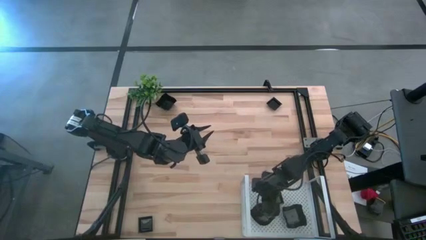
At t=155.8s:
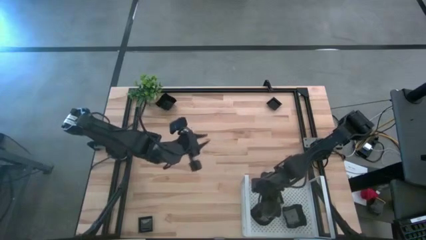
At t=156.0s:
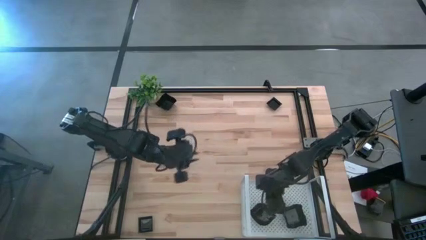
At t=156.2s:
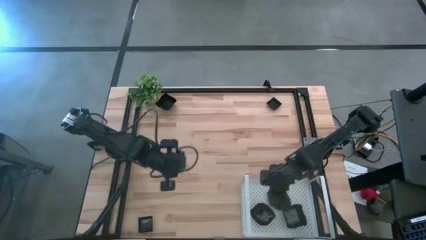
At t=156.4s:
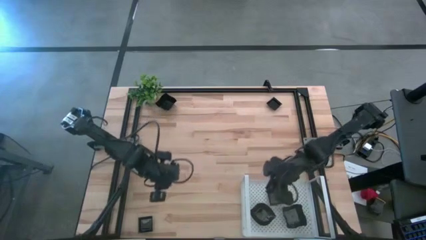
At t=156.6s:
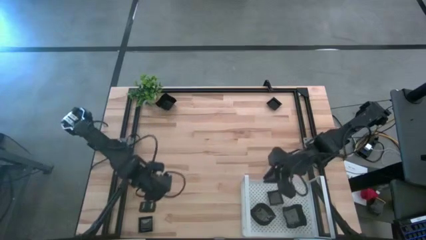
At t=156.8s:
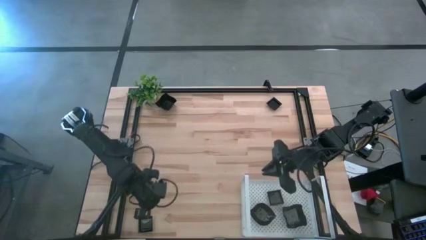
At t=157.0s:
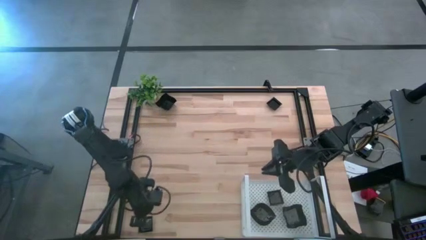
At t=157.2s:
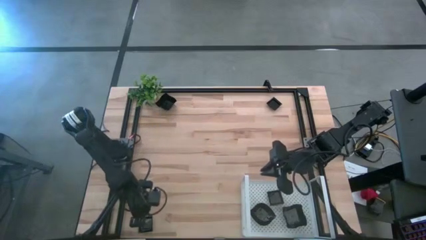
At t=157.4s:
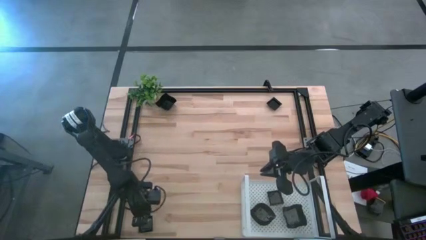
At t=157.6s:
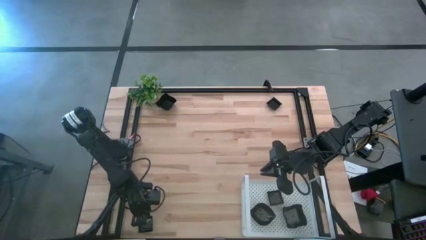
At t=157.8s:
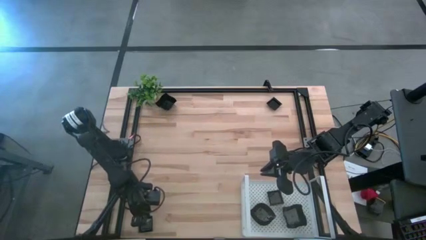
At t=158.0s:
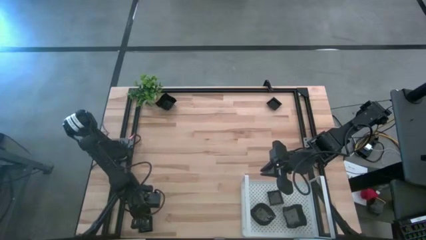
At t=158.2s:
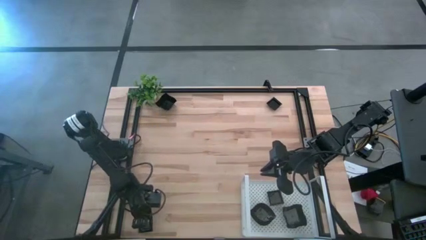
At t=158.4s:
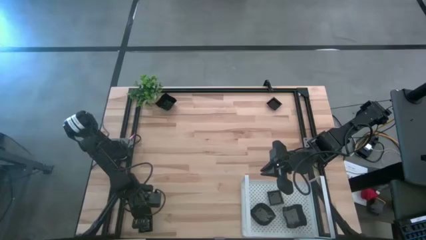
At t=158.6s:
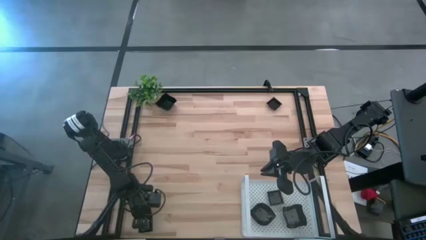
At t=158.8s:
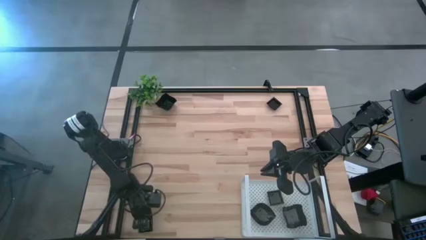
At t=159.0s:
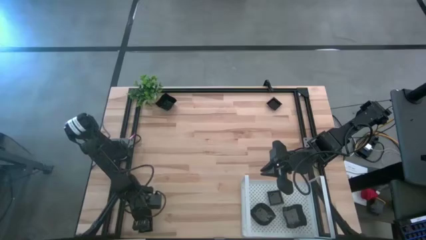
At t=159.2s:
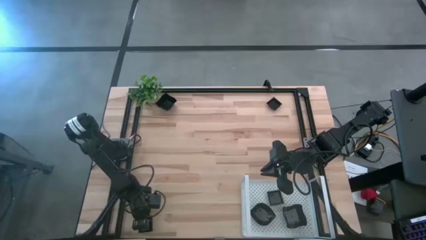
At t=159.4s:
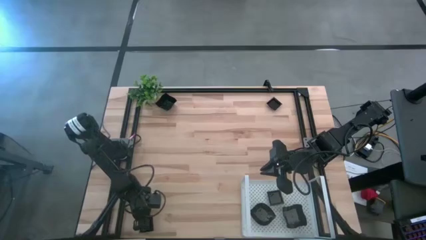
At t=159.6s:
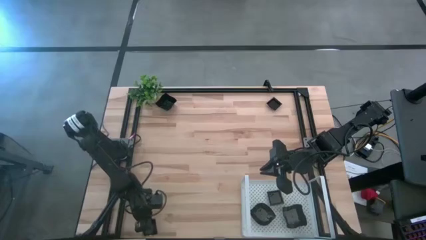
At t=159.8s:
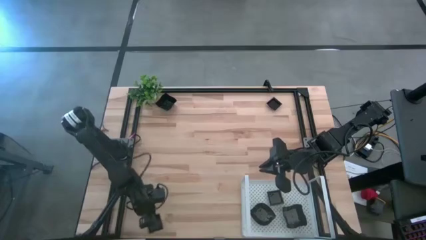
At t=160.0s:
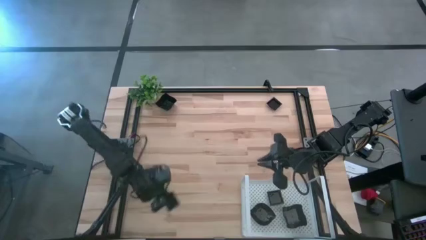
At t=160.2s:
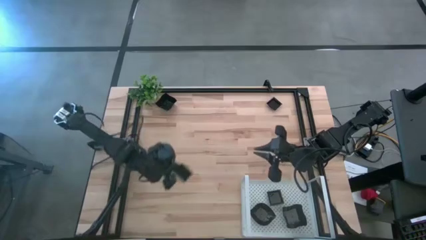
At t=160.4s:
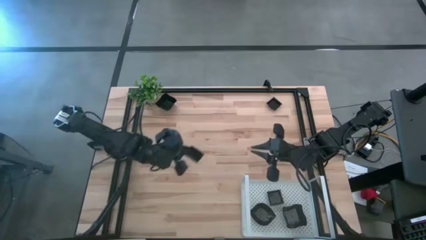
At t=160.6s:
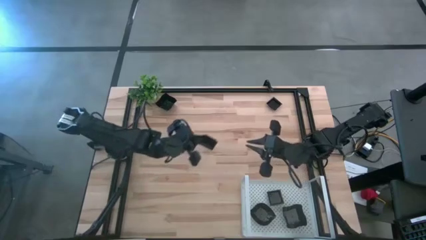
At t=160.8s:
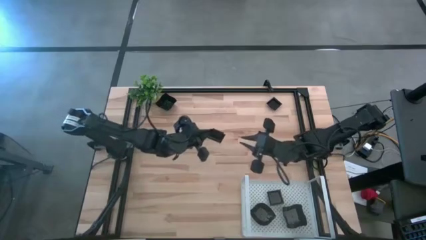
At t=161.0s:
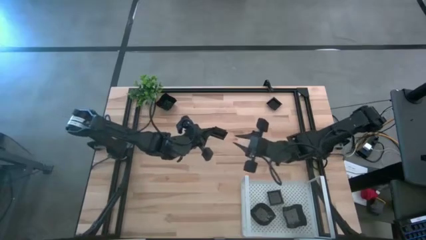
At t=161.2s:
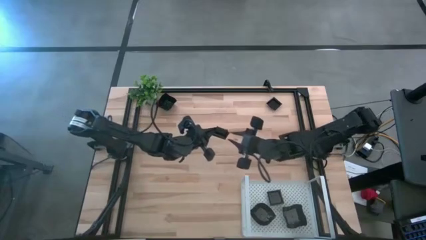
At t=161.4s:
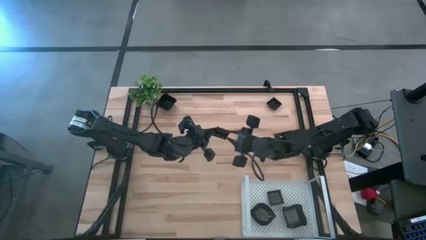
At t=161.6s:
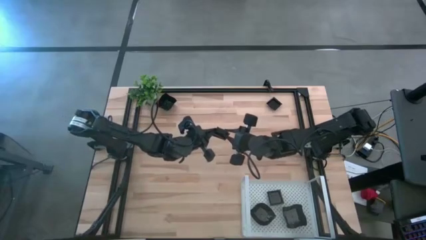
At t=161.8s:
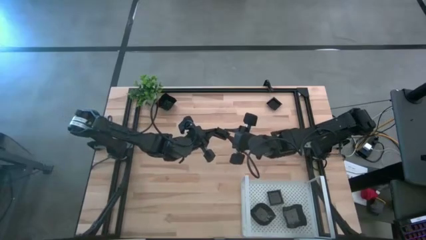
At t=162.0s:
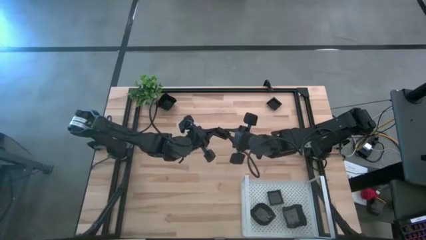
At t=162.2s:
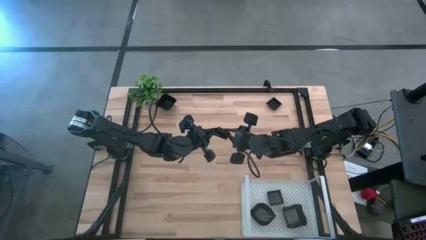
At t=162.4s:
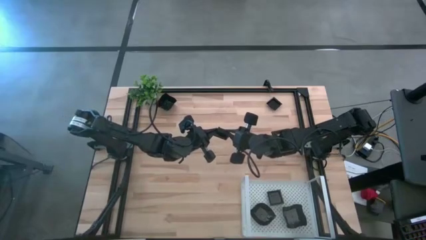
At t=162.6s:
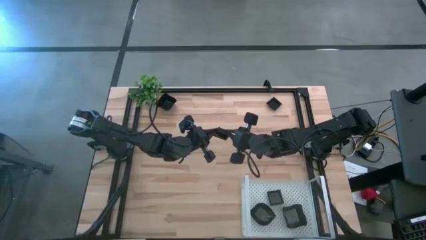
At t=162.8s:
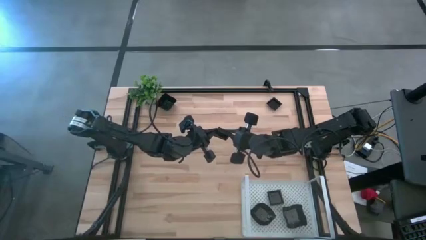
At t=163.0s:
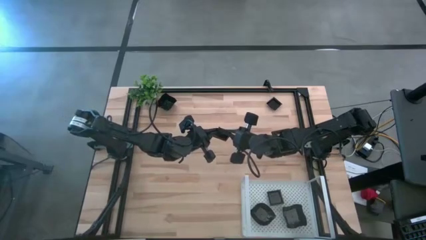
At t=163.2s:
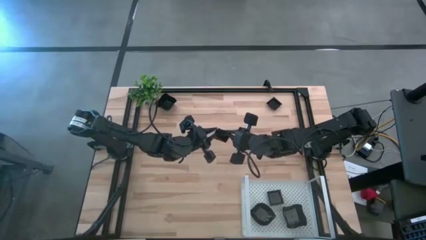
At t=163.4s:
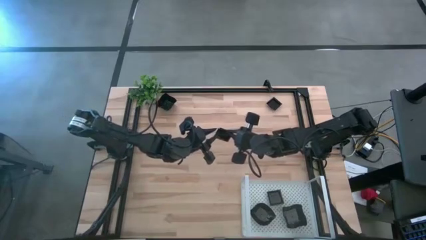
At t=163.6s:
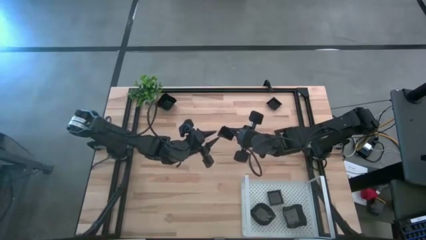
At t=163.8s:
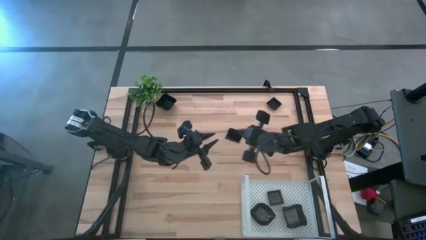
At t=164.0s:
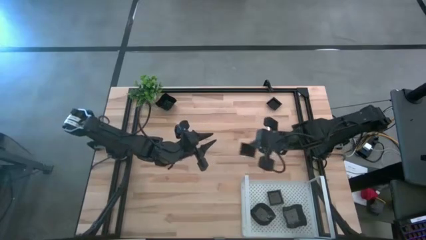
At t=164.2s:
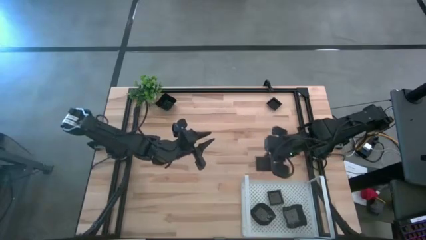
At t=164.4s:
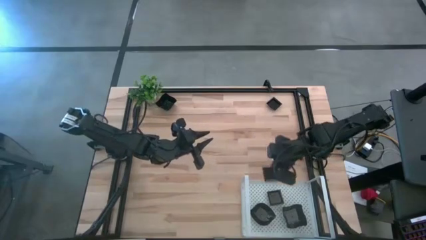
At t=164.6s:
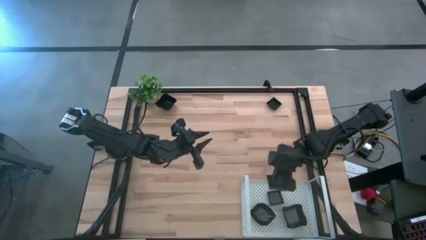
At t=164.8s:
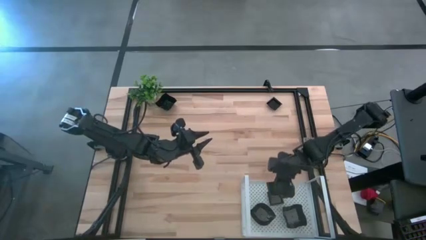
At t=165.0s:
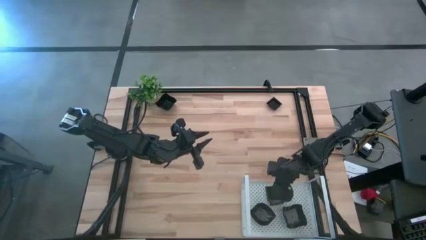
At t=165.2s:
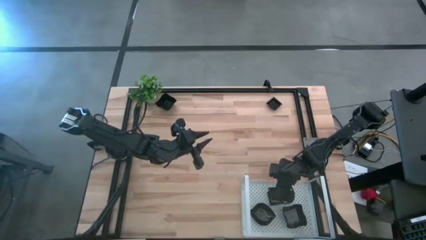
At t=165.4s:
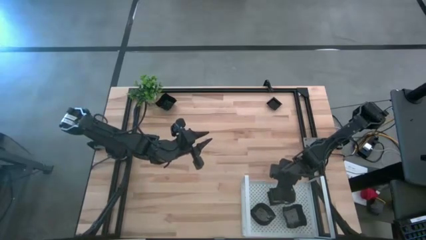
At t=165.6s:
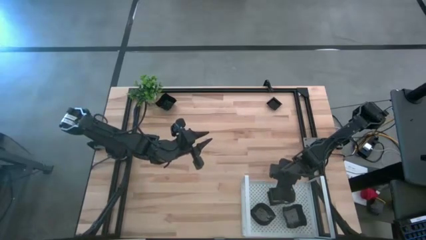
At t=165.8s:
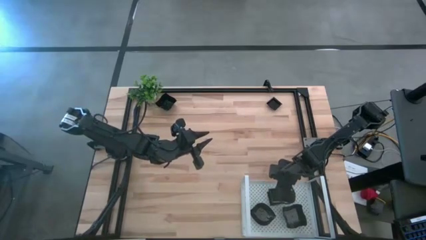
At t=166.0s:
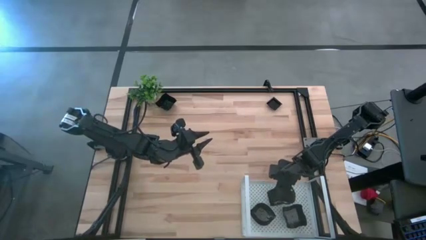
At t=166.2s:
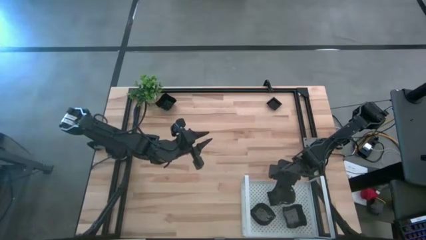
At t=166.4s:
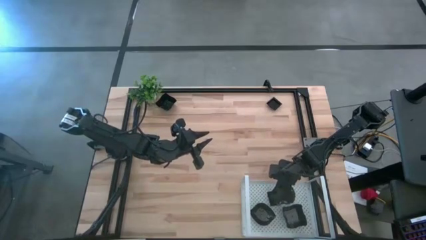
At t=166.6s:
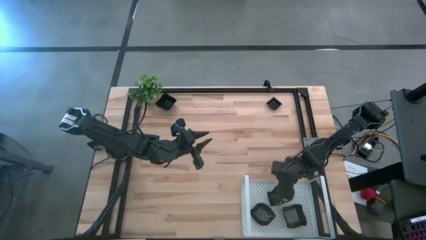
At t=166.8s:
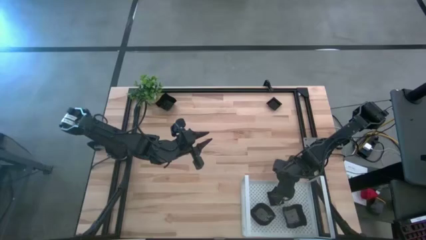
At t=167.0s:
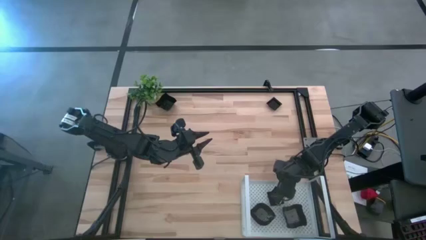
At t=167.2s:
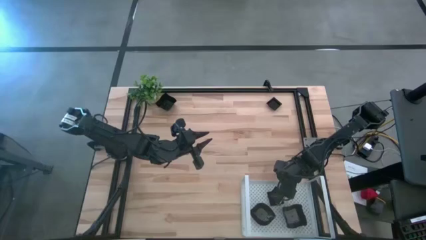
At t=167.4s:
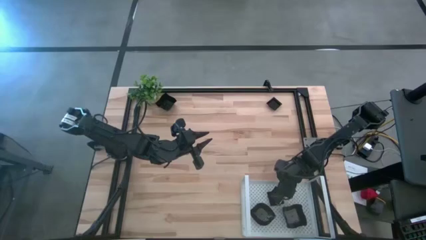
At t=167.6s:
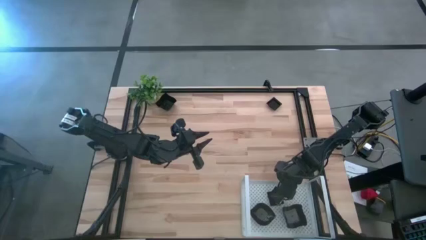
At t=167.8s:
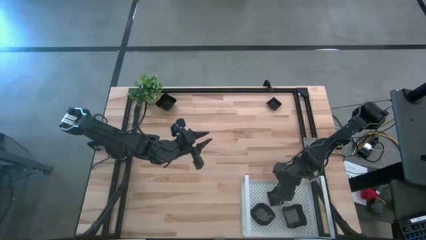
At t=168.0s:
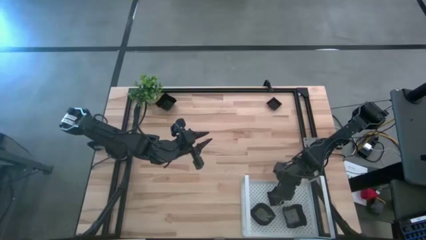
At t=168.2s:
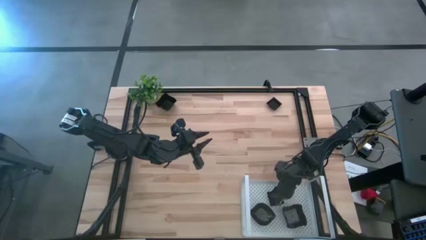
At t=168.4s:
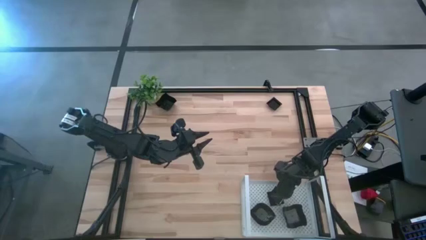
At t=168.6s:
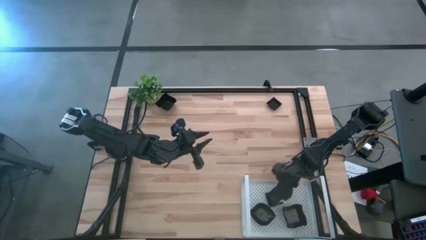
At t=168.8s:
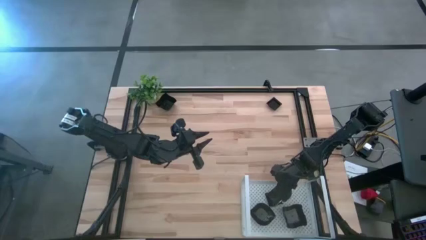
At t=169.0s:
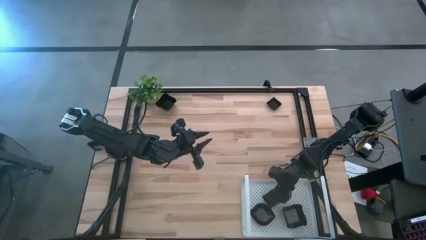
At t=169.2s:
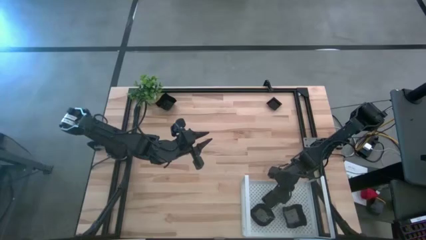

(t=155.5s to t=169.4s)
Task: Pick & Place Mini shaped plates
Stack the square plate on top of the other square plate on the shelf

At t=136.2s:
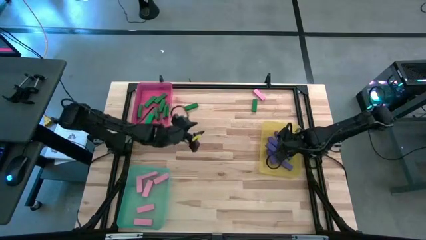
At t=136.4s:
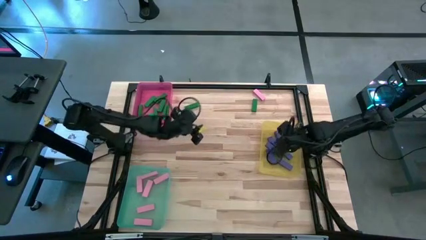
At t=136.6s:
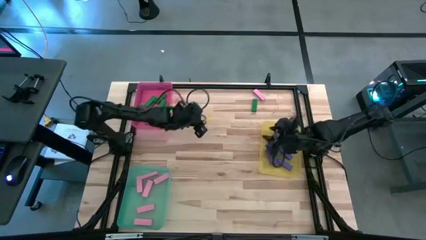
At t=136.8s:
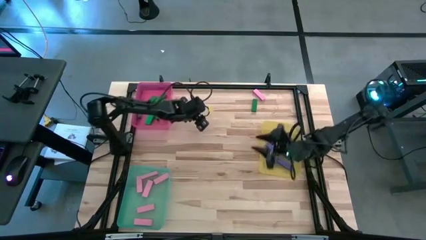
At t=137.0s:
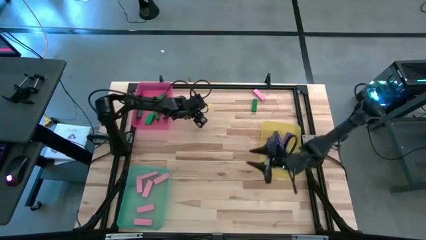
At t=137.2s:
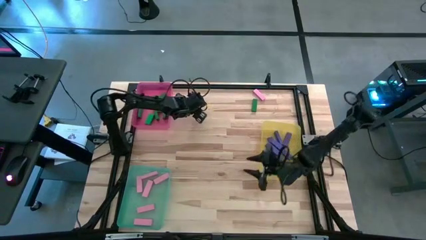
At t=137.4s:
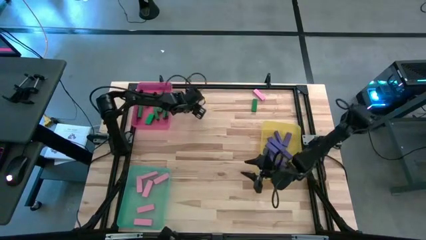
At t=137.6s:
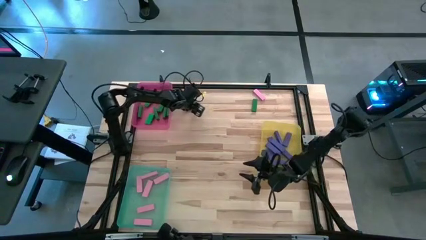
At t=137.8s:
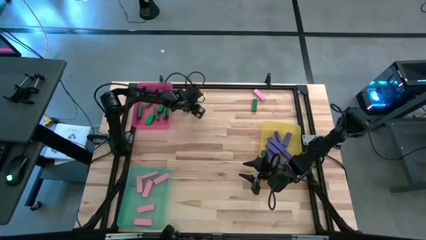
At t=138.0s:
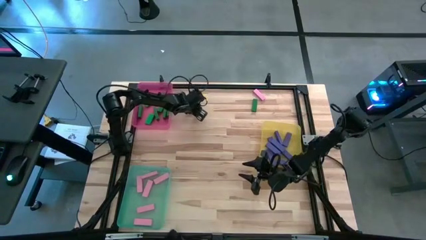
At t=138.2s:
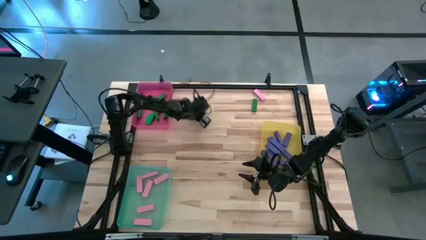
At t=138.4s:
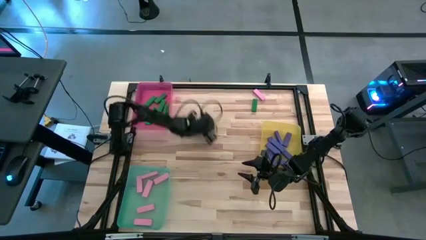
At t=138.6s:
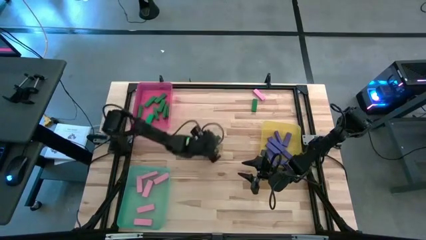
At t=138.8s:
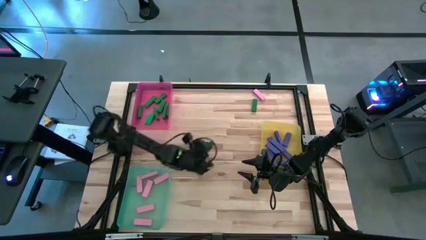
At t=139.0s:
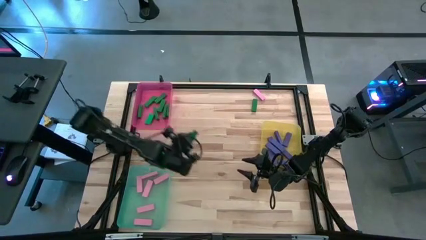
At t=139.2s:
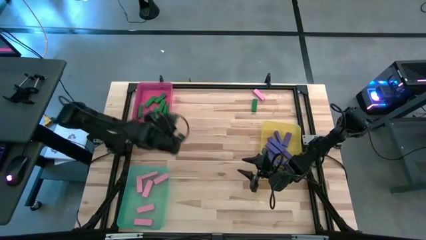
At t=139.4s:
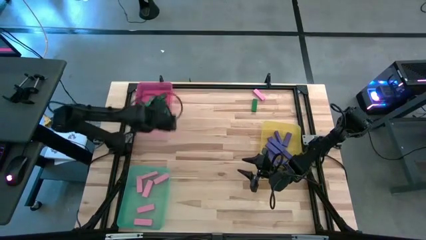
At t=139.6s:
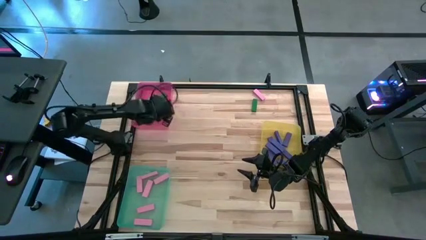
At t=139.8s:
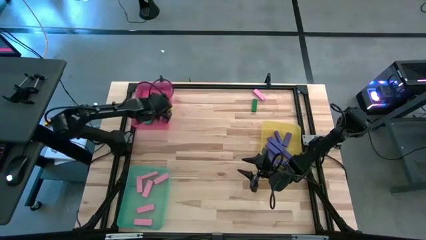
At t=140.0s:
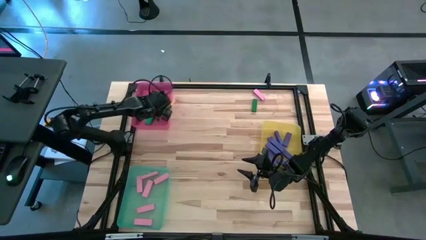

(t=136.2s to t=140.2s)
Task: Sort blocks
Put the green block into the pink bin
